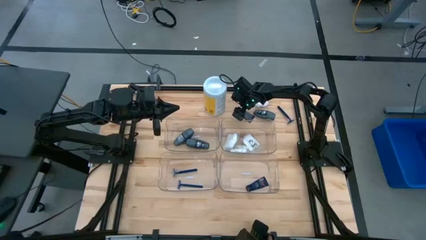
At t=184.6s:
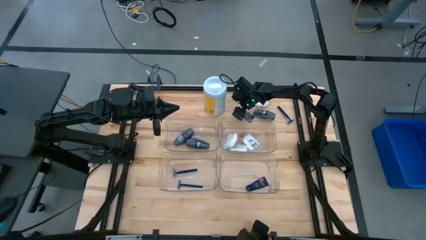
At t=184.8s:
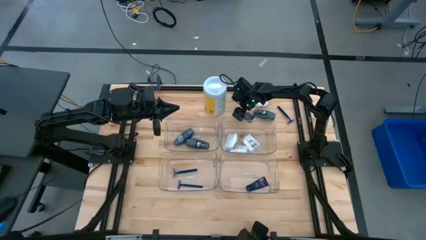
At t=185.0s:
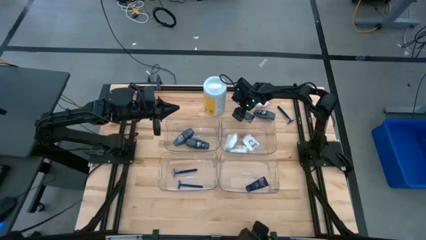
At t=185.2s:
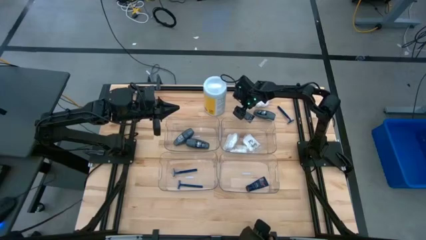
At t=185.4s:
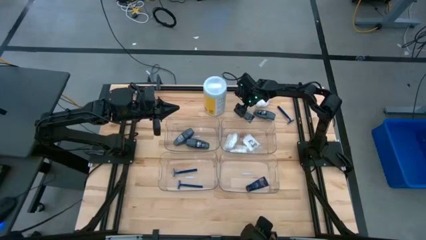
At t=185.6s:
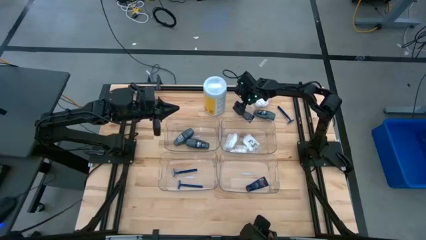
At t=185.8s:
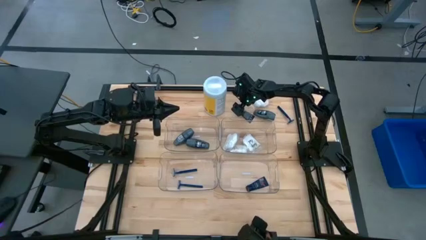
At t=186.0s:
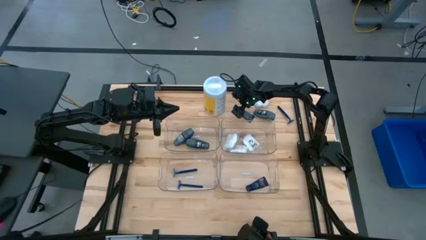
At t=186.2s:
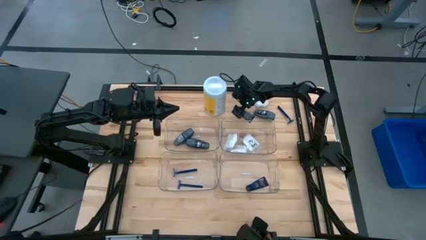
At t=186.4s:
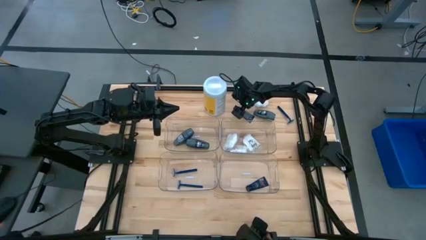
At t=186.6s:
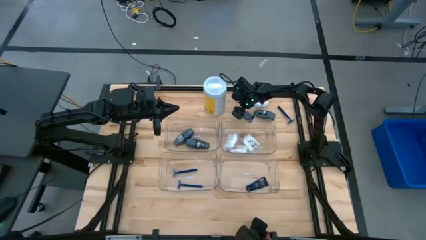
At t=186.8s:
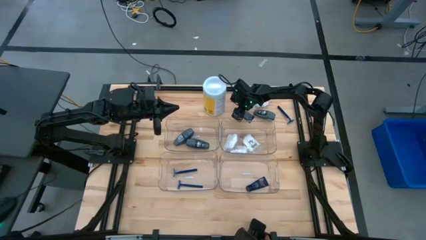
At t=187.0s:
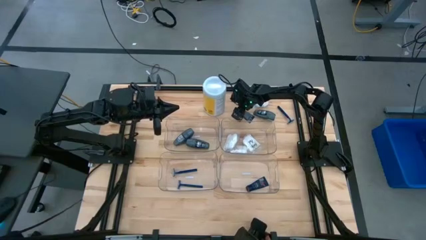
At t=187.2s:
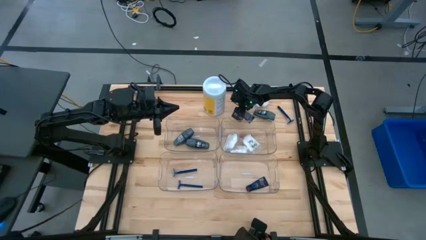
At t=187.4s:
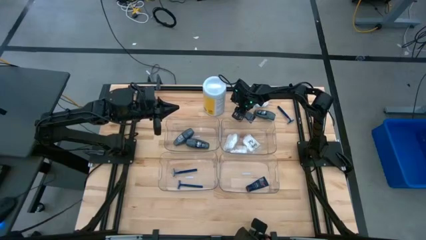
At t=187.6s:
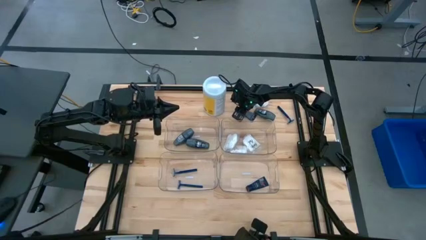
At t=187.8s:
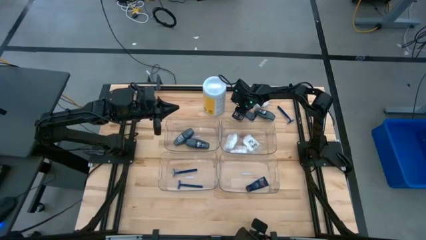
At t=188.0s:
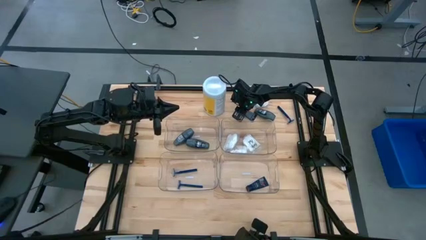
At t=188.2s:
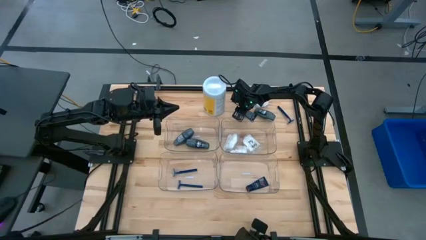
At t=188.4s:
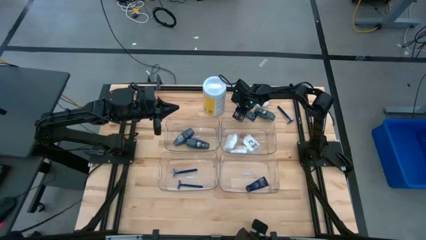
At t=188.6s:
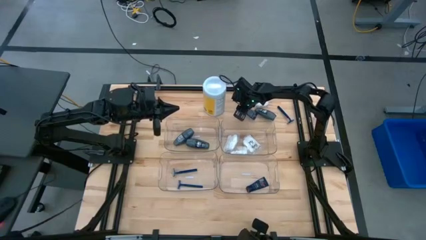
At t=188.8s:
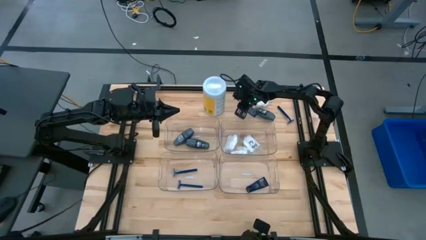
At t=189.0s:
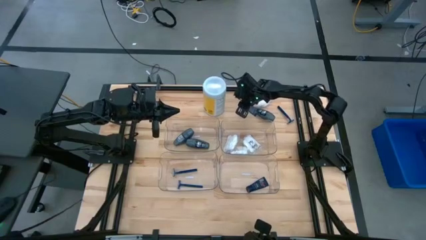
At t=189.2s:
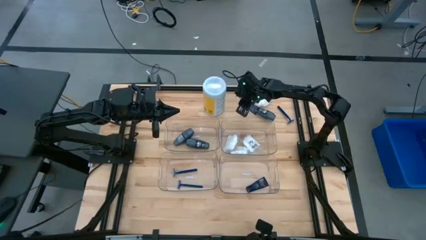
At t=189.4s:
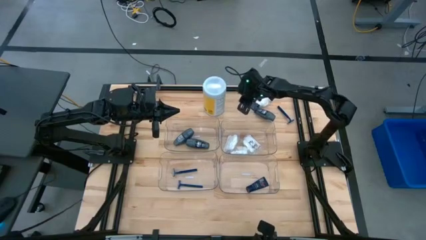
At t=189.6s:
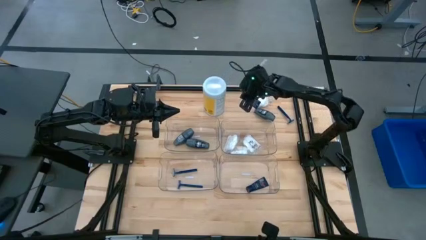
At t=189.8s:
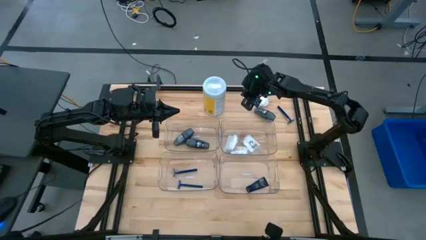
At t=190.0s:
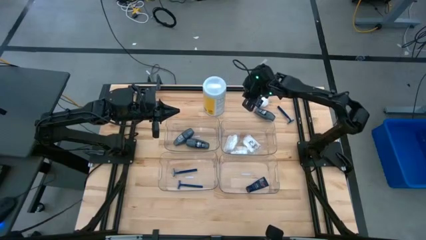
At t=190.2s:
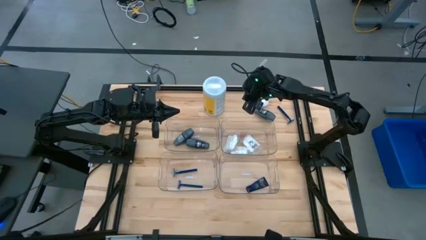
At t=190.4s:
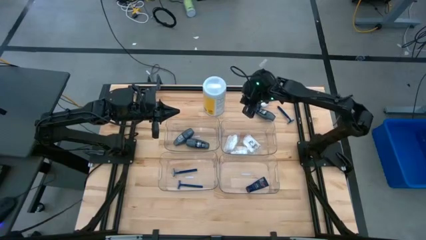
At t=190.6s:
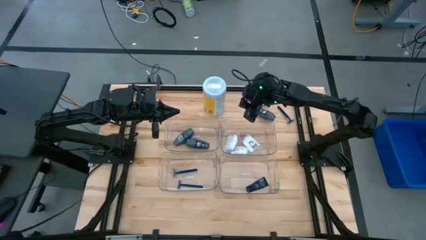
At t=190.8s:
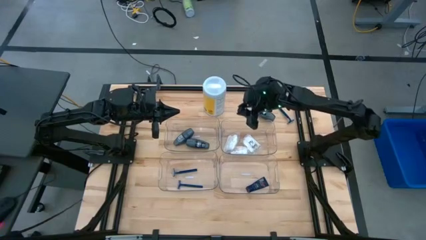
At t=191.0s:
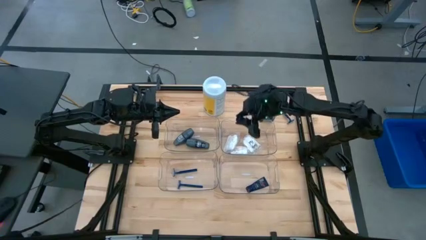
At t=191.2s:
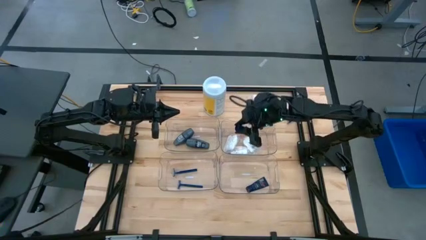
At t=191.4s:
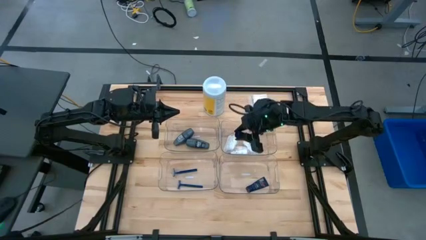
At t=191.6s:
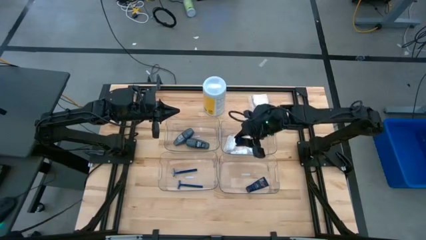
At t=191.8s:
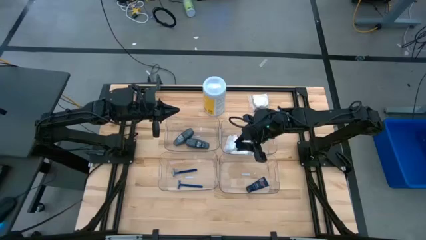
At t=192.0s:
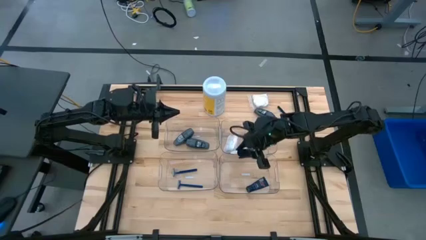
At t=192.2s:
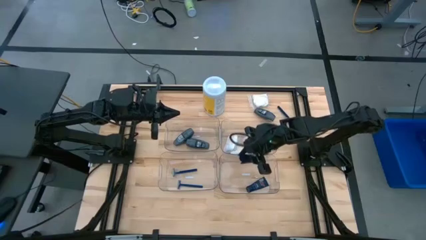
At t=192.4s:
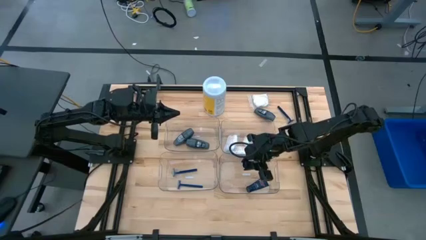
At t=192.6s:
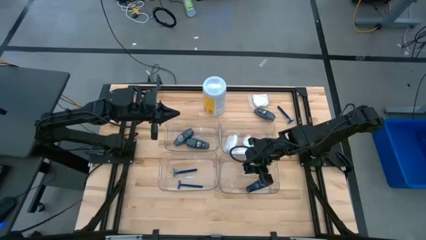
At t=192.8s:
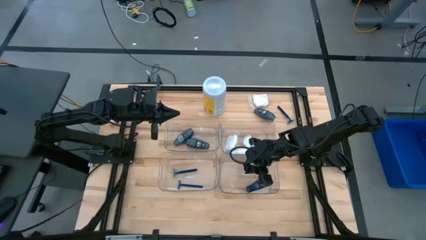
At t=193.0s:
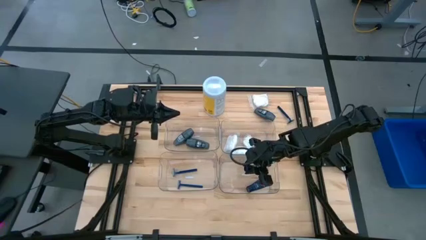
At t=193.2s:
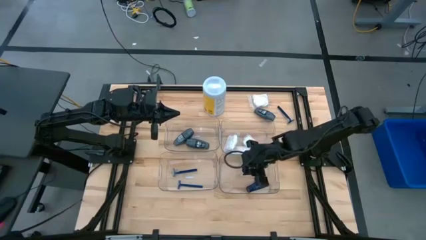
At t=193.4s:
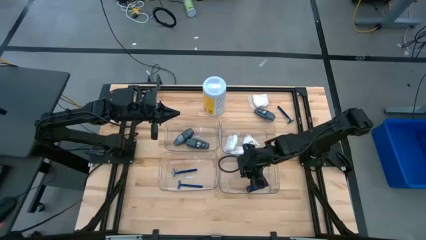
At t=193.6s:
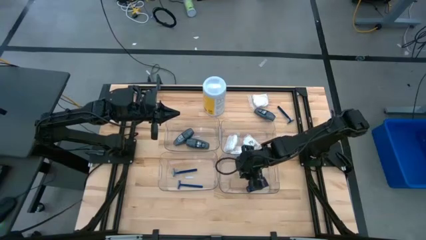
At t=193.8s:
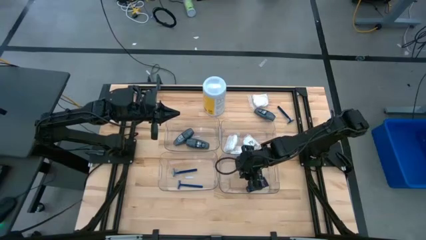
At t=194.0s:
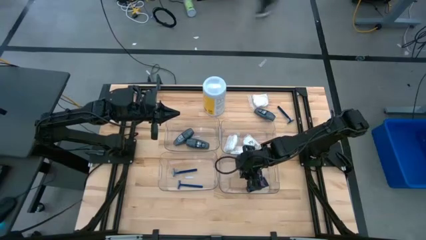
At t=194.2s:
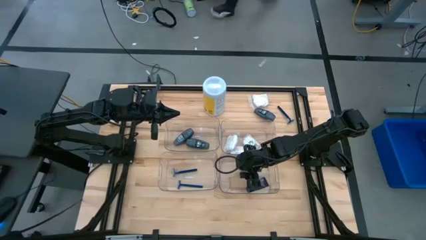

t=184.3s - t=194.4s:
Task: Pick & Place Travel size toiletries
Put the blue shaver cream into the bottom right transparent bin

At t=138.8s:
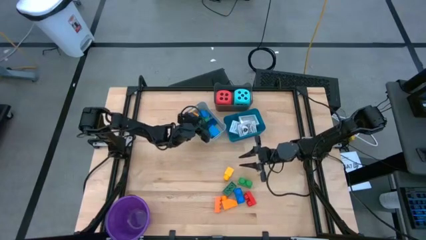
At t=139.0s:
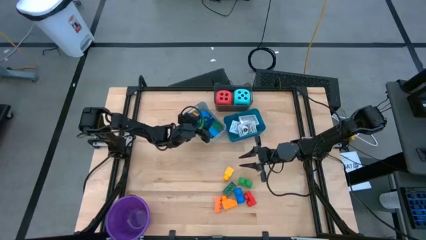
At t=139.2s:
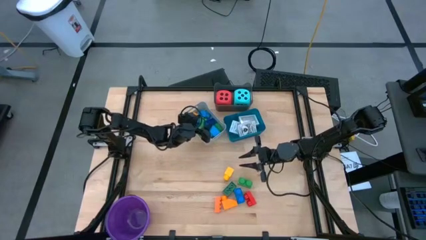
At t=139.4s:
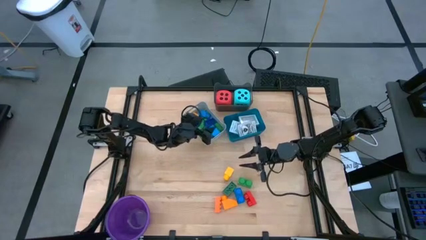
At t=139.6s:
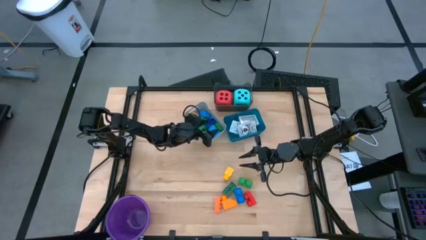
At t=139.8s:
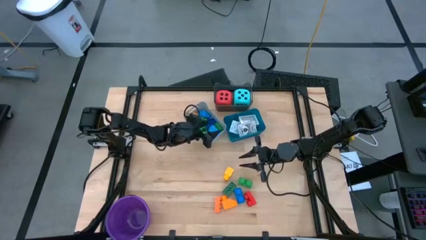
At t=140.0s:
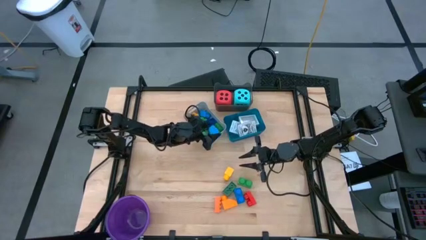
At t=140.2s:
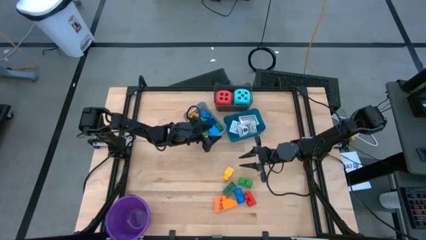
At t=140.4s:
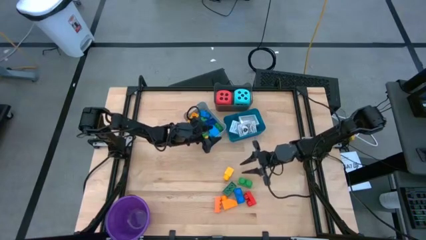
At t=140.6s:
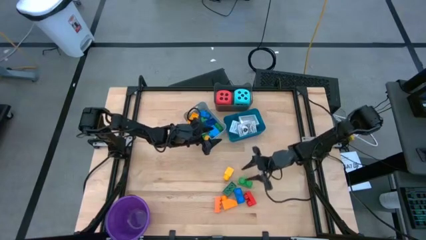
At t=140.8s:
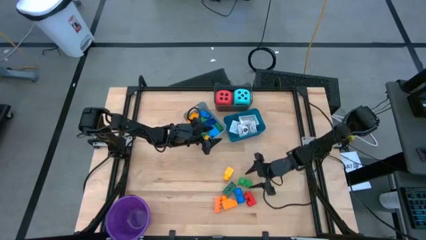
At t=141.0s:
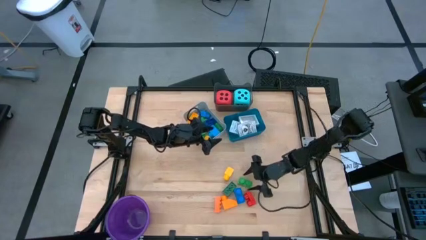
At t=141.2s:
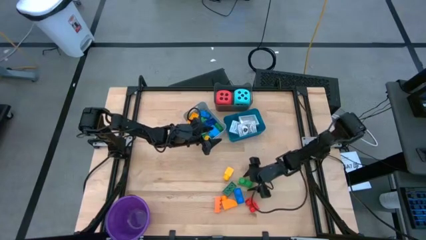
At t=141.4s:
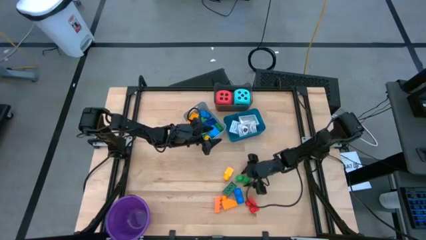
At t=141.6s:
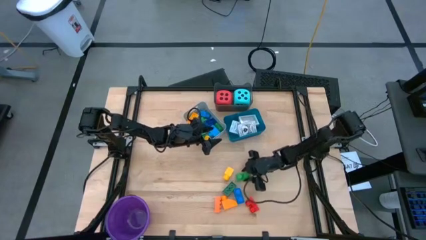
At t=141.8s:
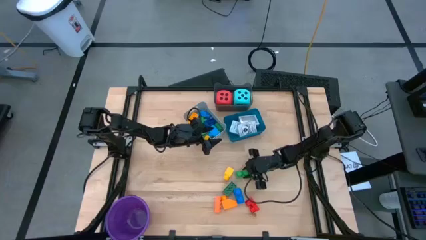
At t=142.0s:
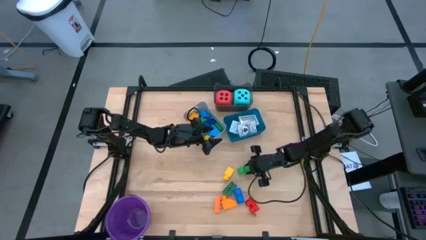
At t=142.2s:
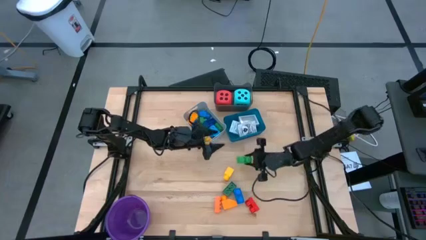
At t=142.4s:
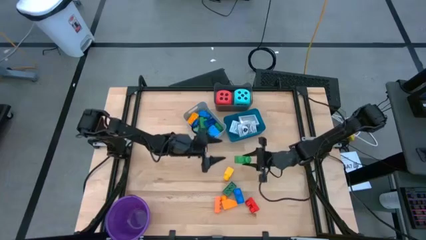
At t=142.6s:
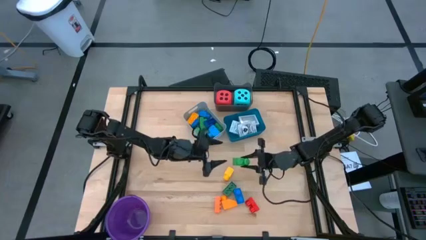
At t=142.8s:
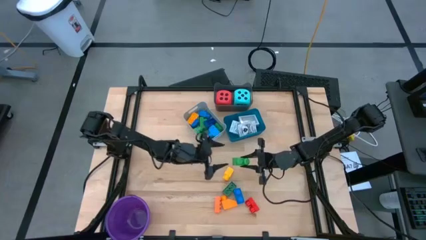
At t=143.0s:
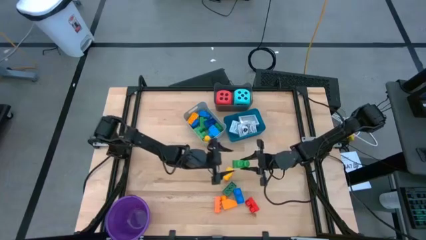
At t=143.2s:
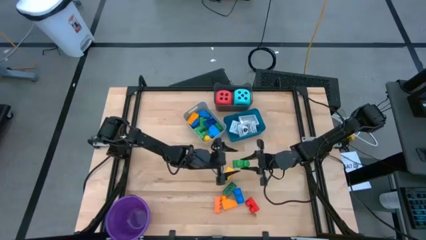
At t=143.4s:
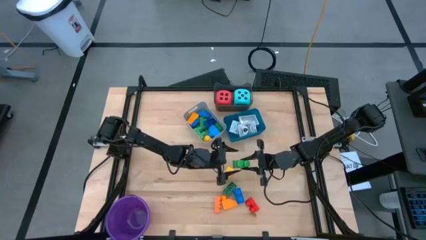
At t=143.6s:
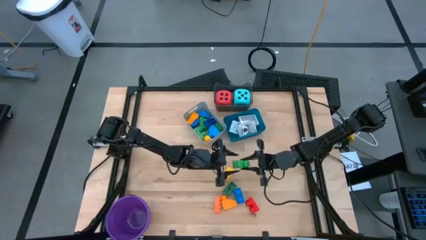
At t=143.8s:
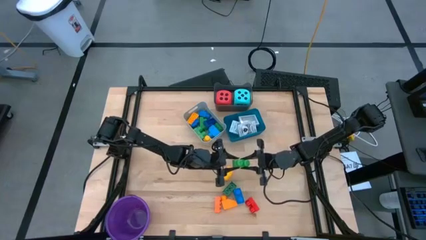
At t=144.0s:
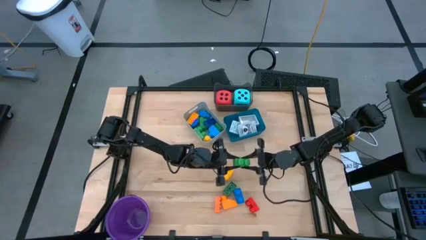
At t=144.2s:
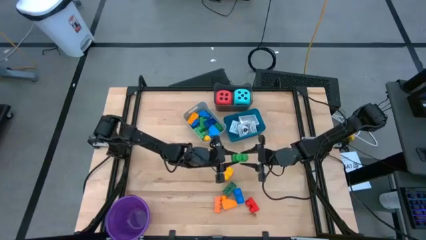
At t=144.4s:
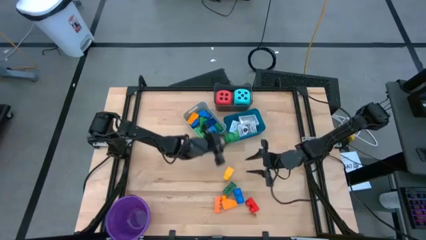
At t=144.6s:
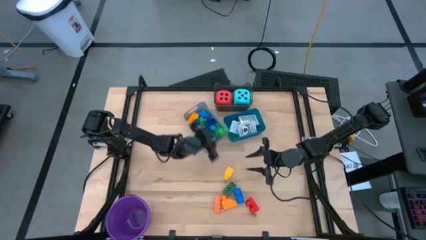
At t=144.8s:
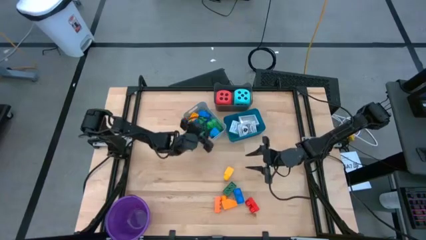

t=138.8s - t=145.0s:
Task: Pick & Place Toys
Put the green game piece into the gray bin
